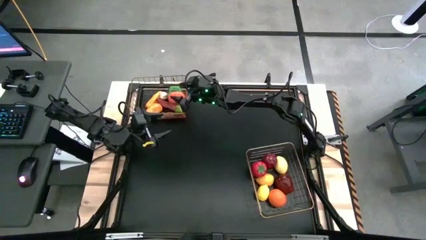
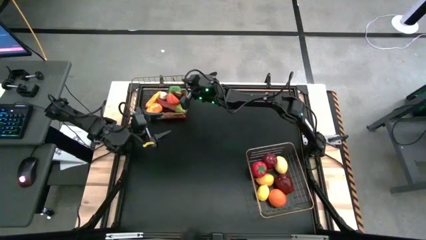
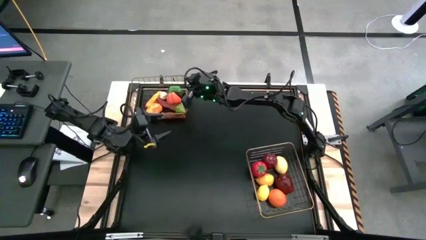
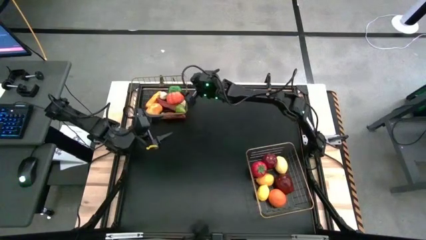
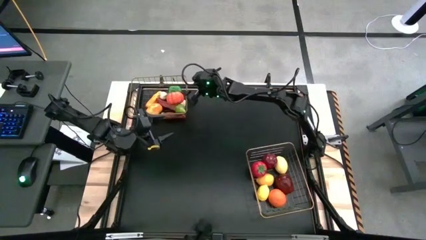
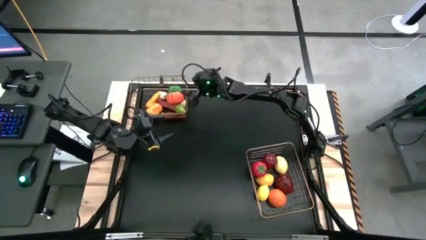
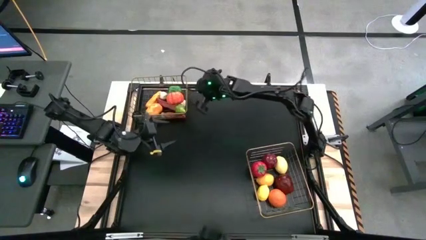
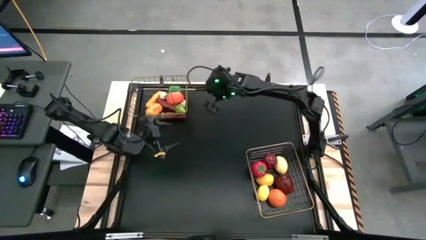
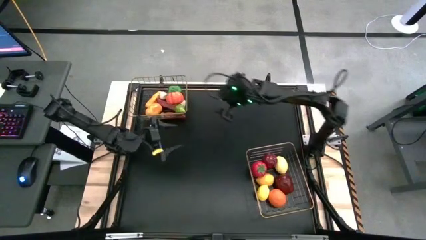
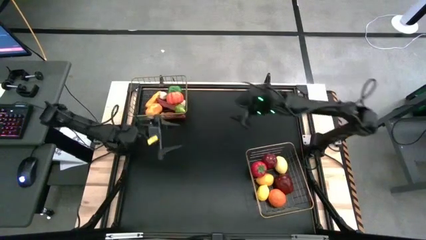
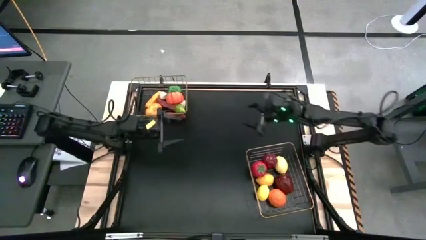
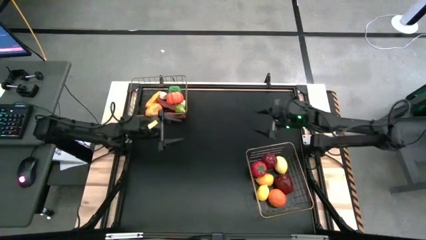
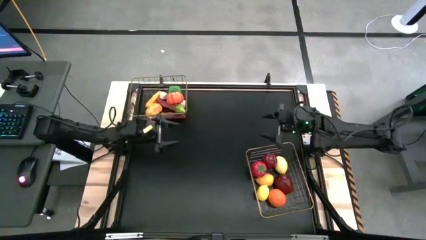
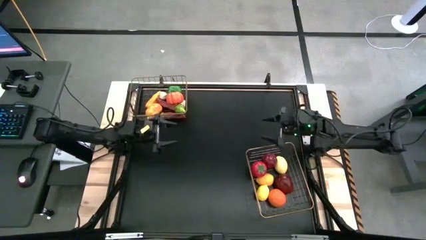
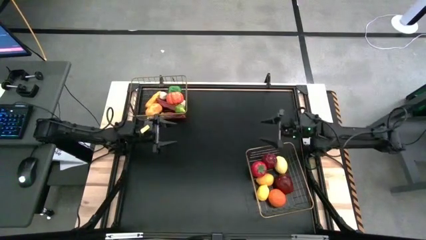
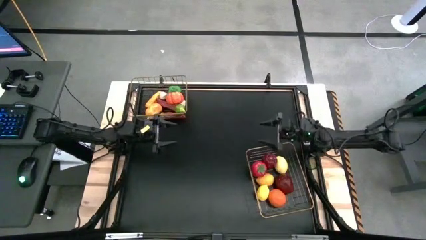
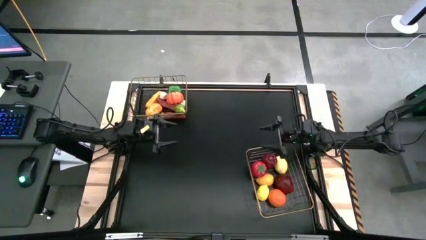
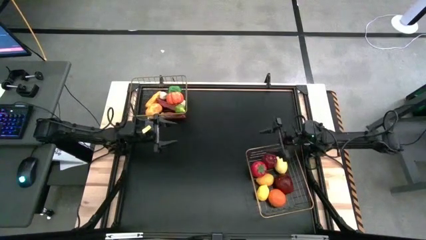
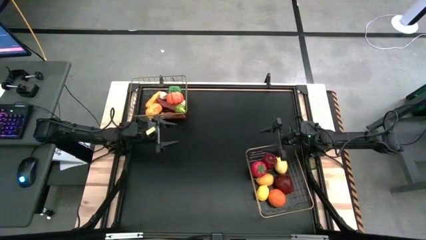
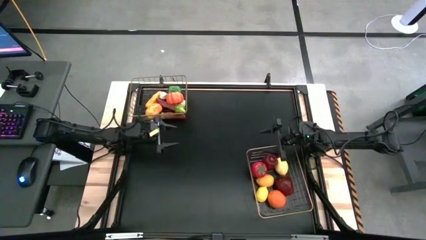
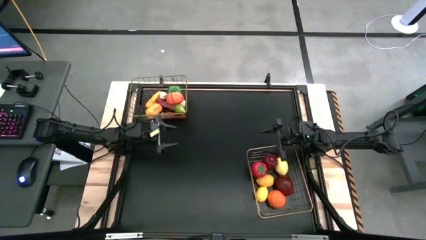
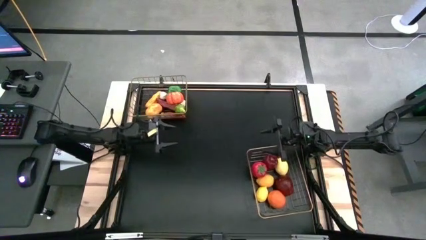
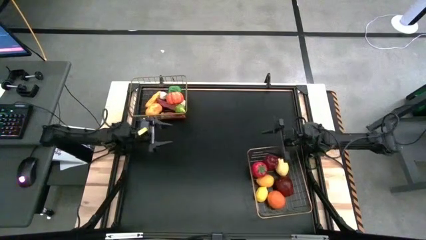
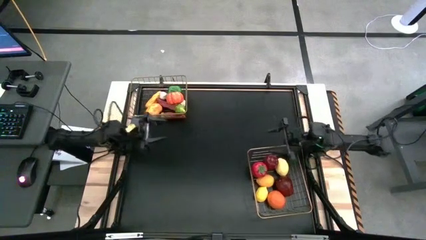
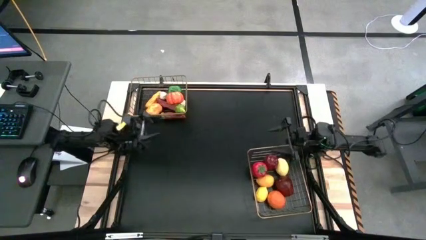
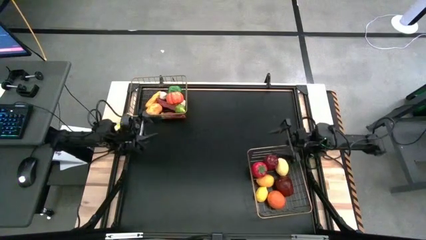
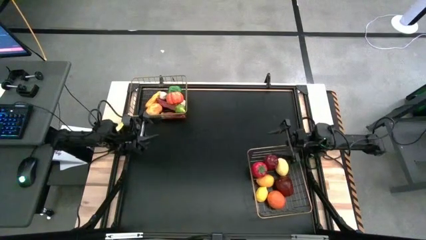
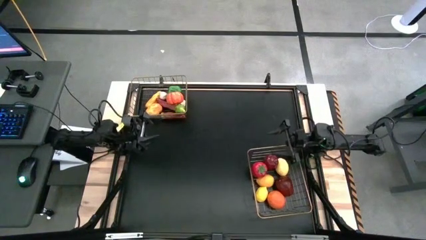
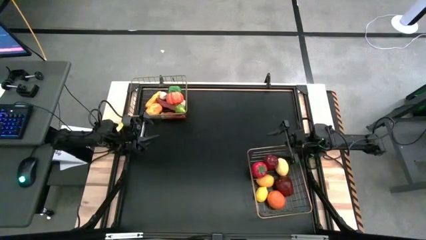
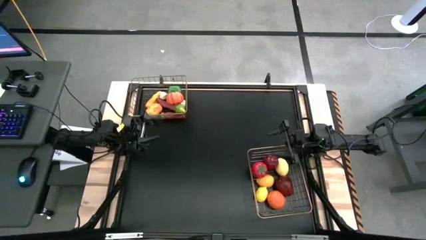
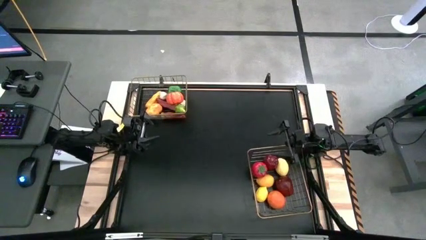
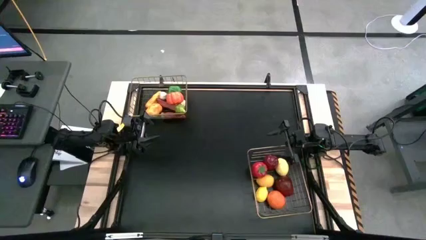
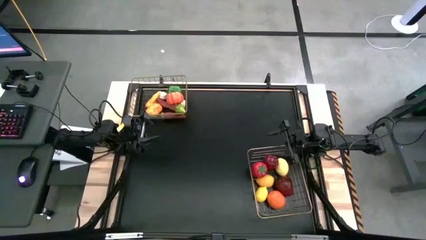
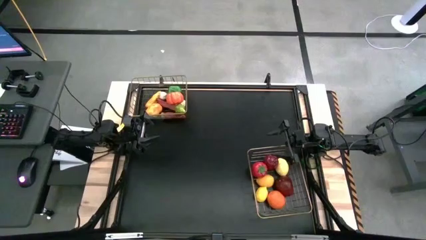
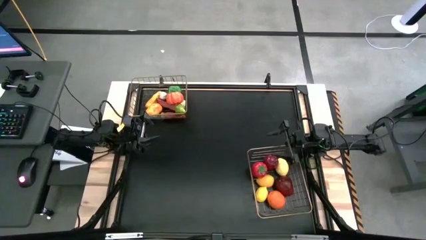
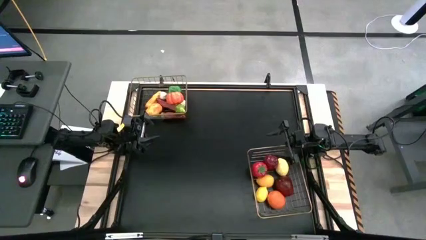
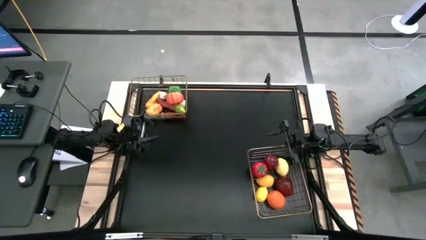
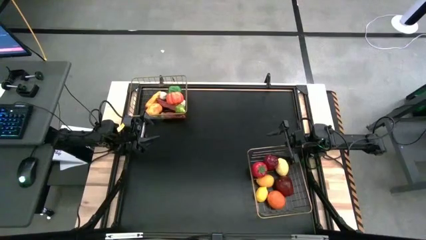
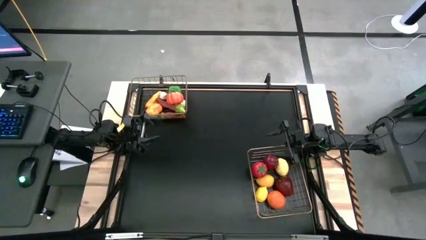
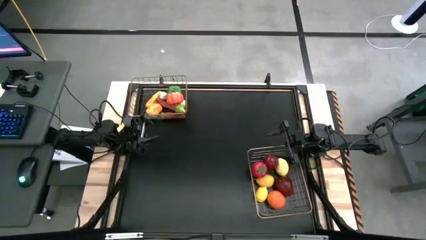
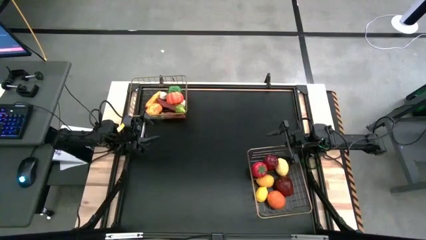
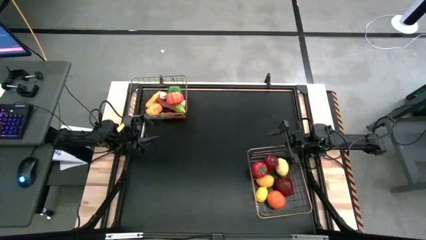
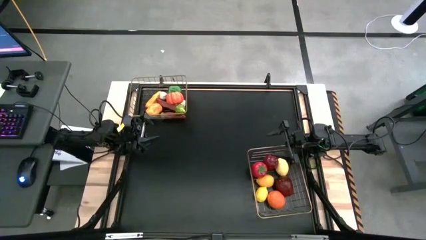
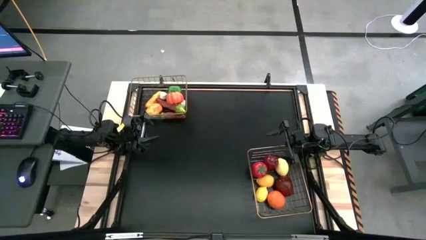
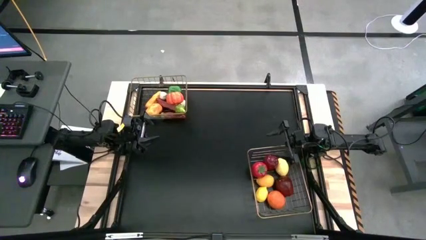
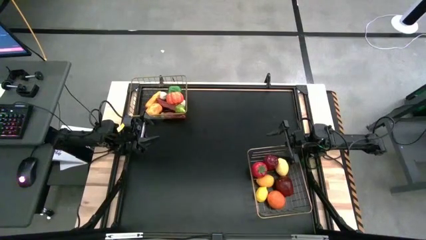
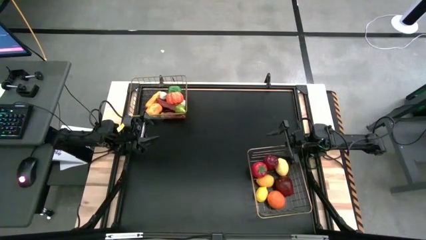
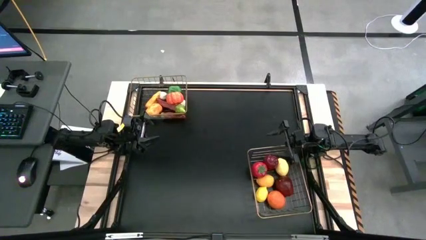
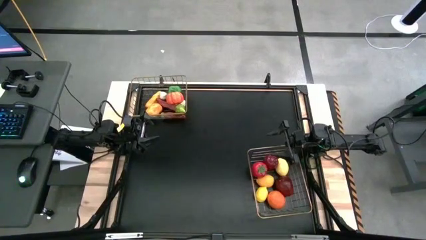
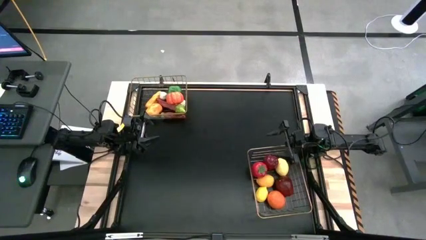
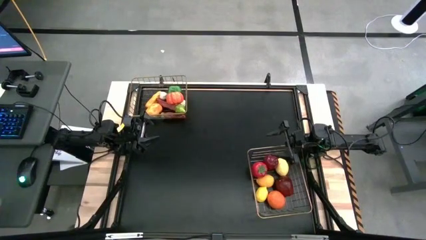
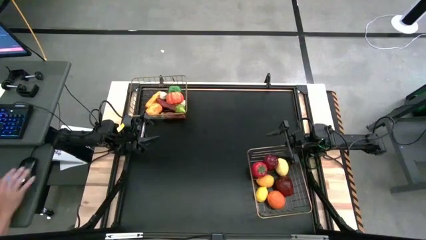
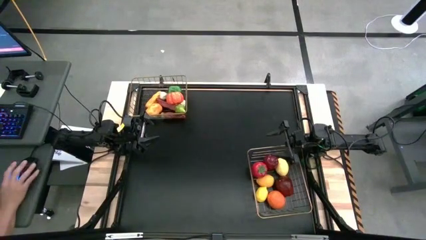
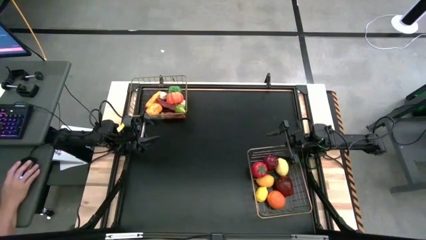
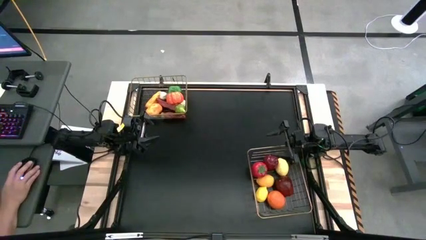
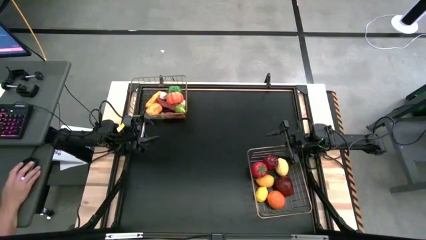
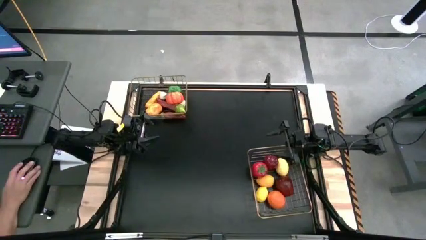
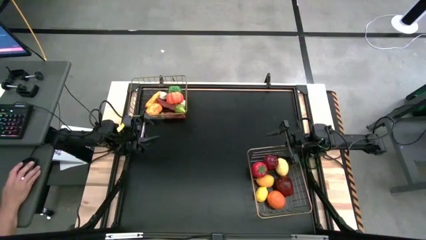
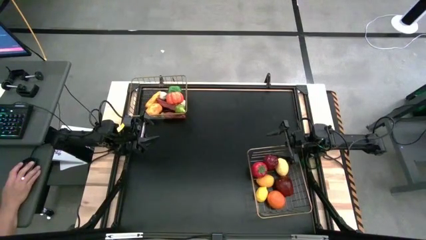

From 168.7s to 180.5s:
Task: Sort produce into baskets
Return to Home Position

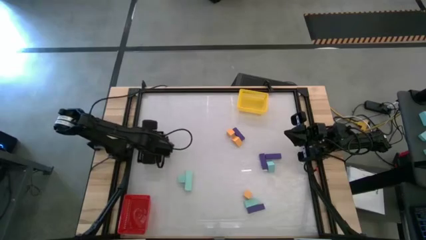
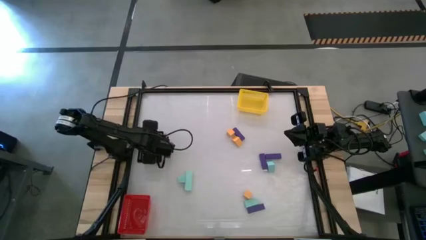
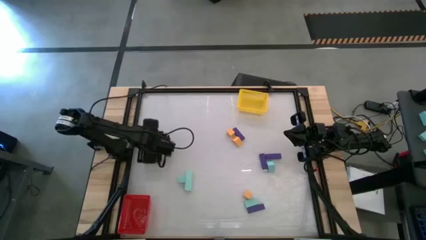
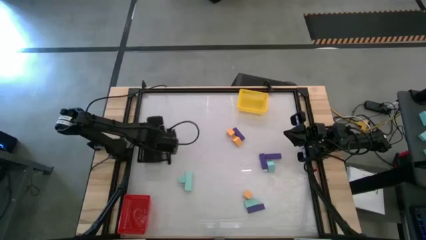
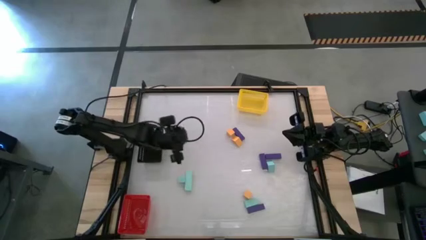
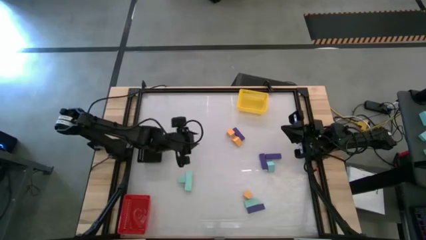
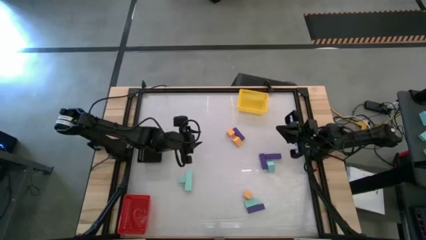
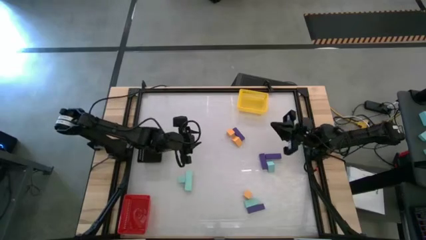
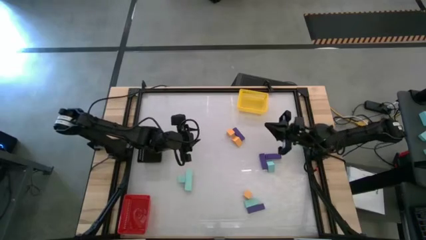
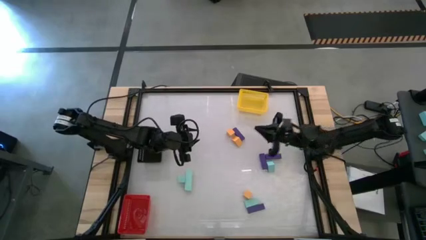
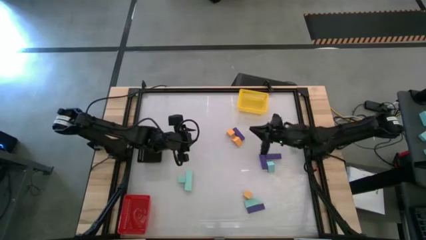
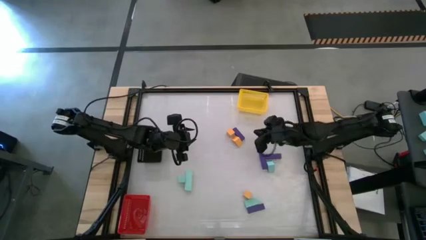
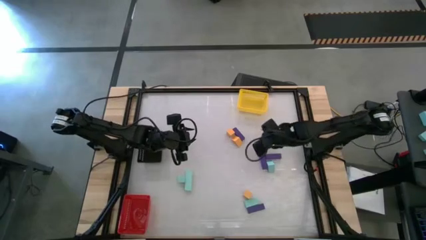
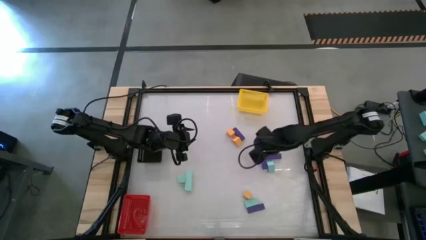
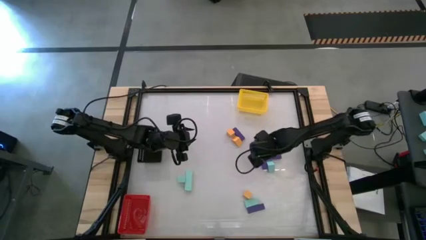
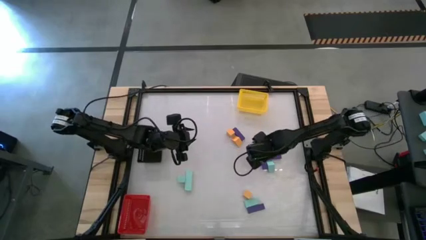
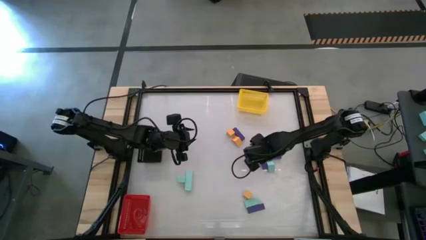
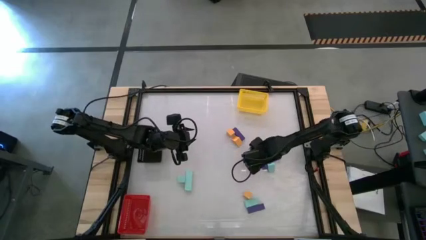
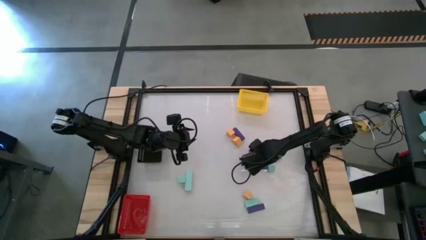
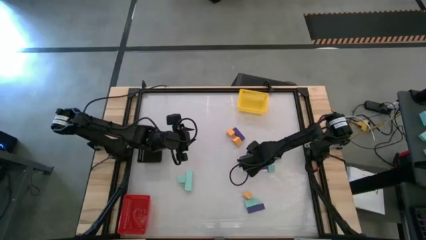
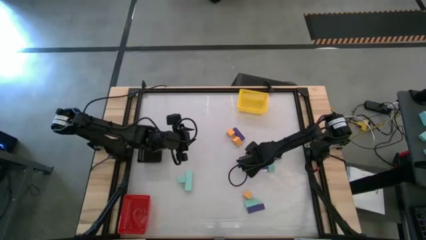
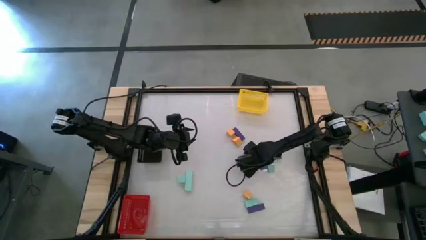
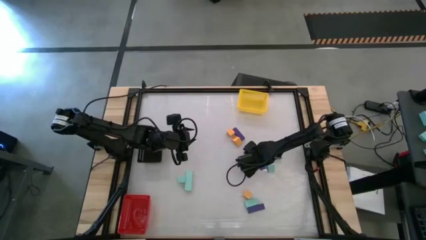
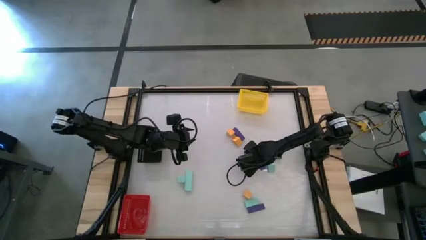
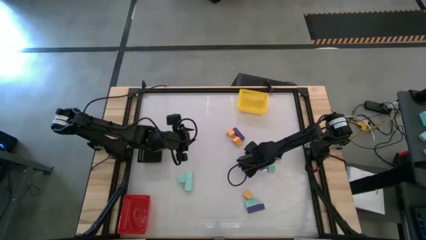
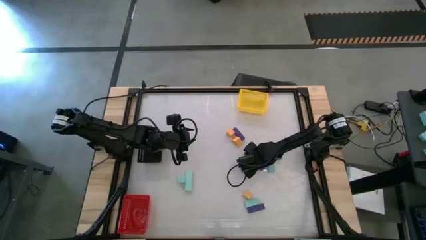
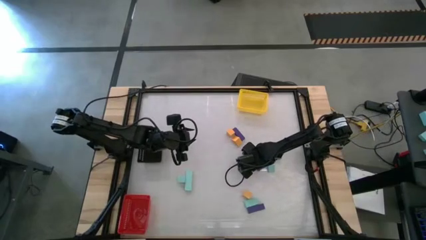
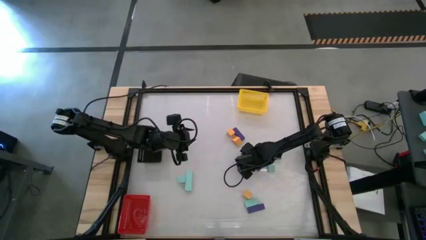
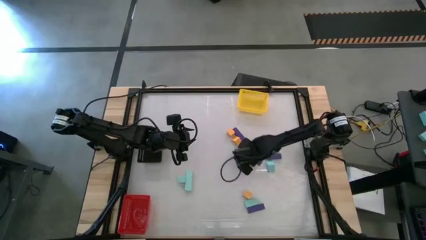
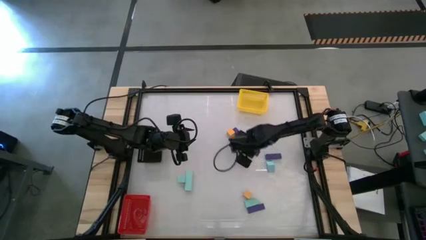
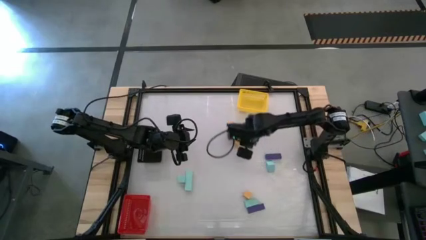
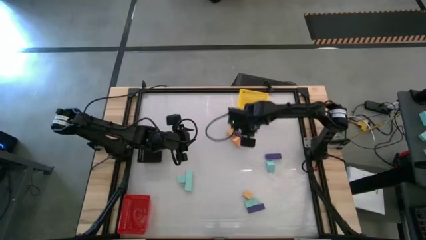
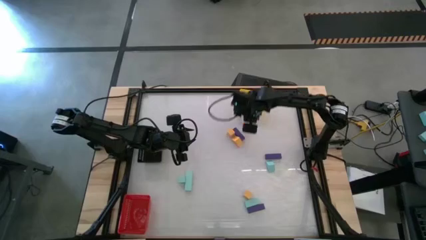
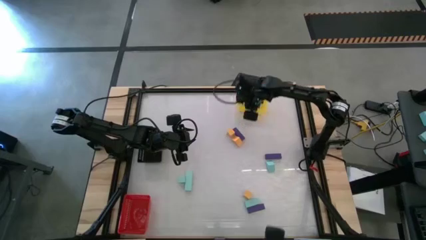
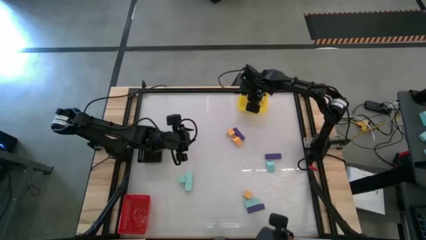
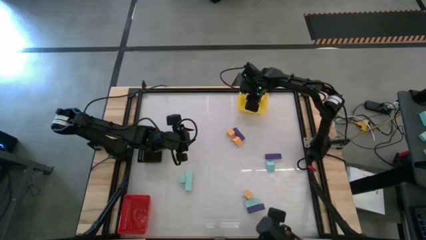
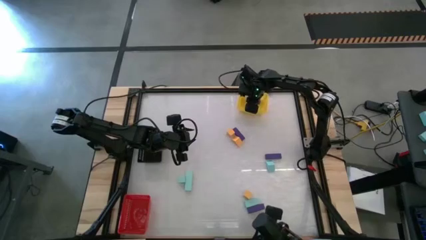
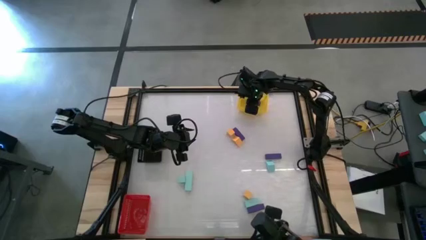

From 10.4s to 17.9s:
Task: Sort & place blocks by color
Put the purple block into the yellow bin
